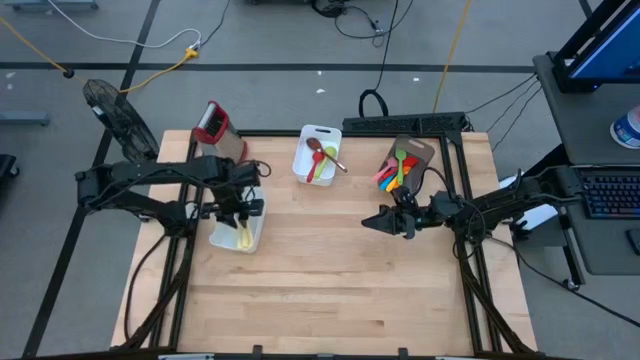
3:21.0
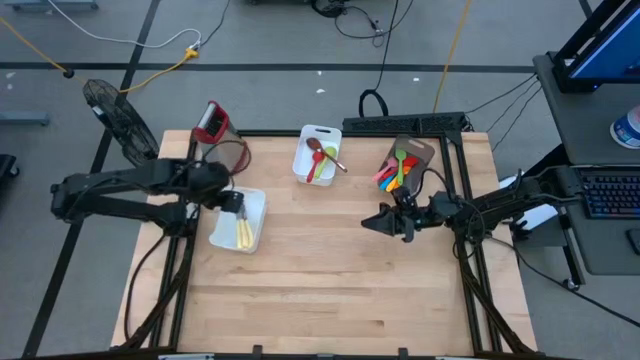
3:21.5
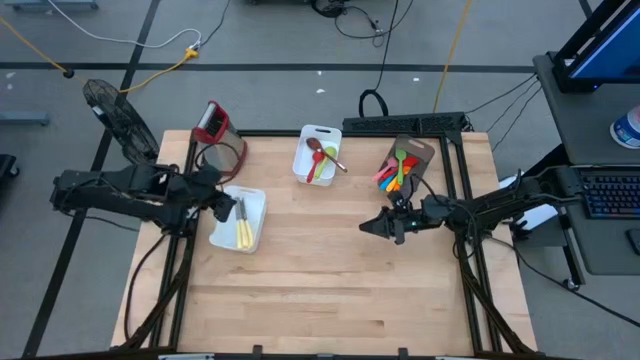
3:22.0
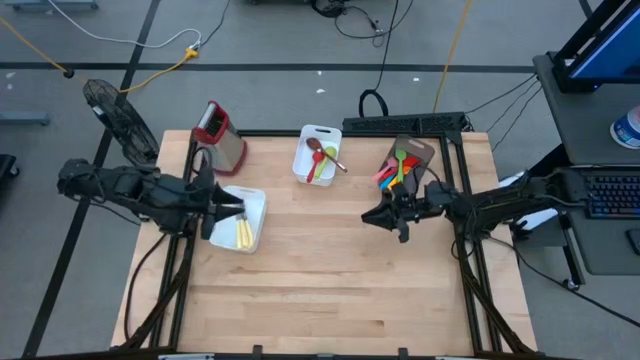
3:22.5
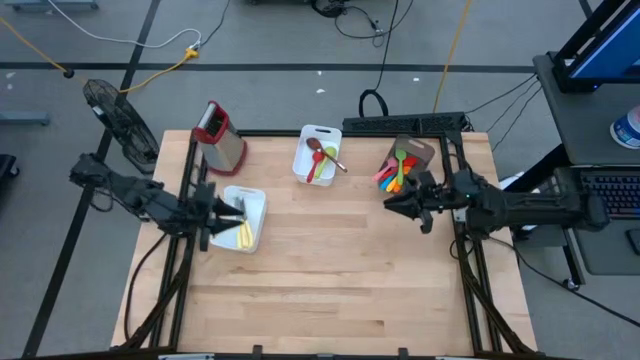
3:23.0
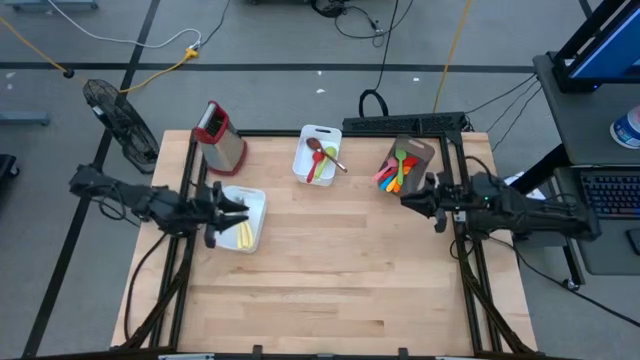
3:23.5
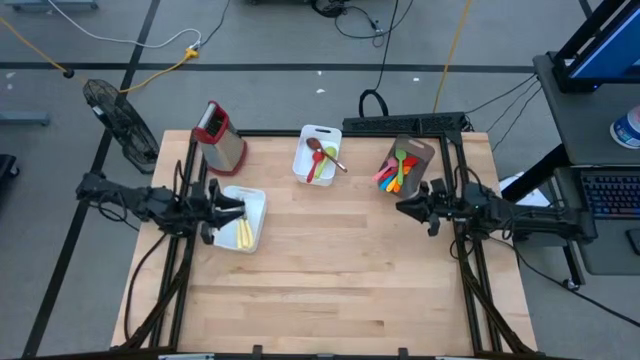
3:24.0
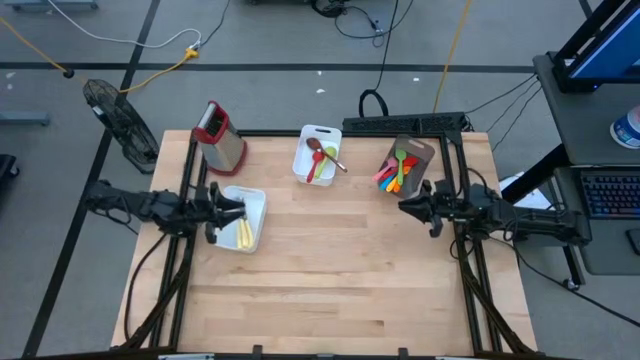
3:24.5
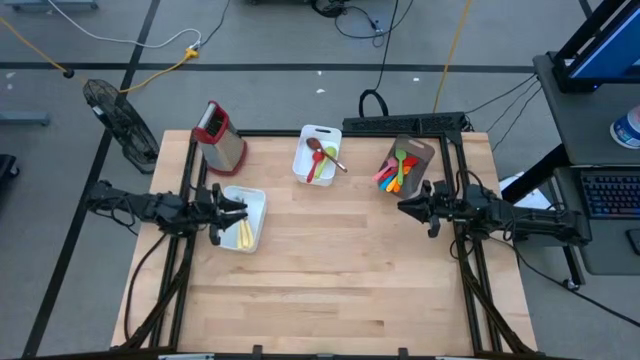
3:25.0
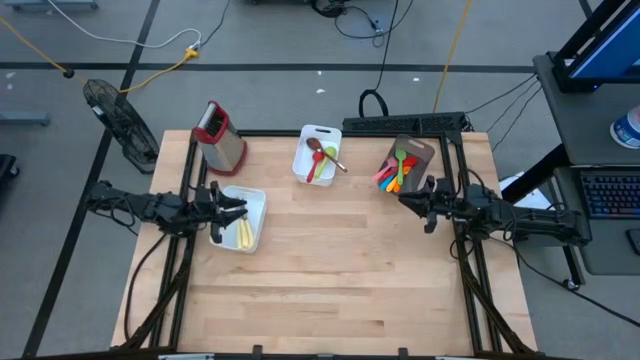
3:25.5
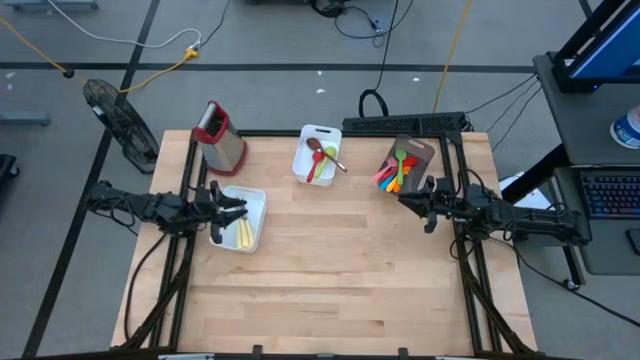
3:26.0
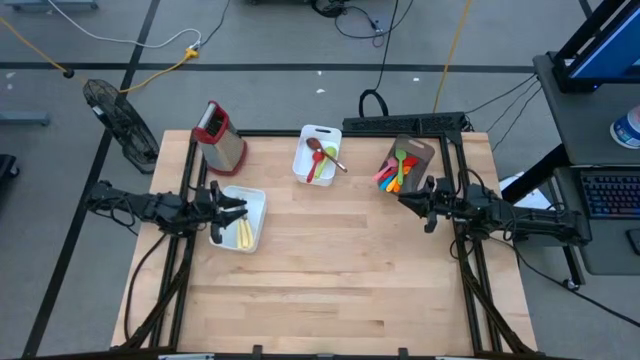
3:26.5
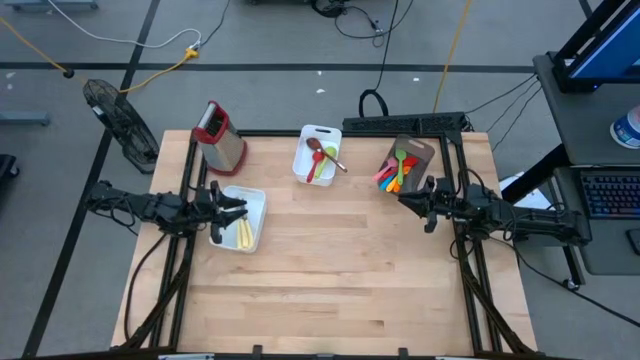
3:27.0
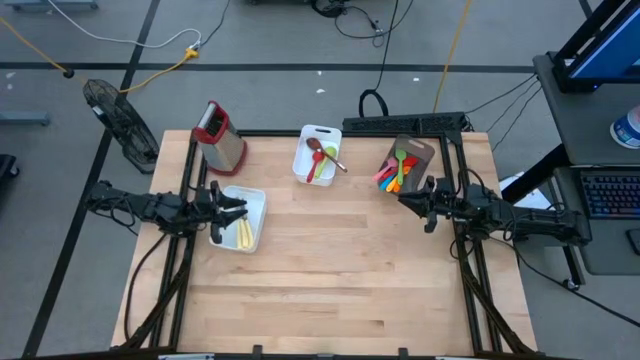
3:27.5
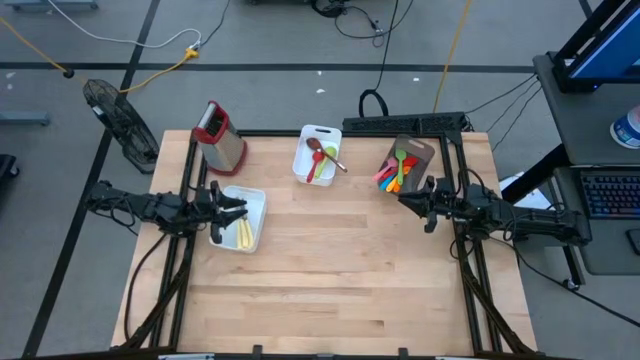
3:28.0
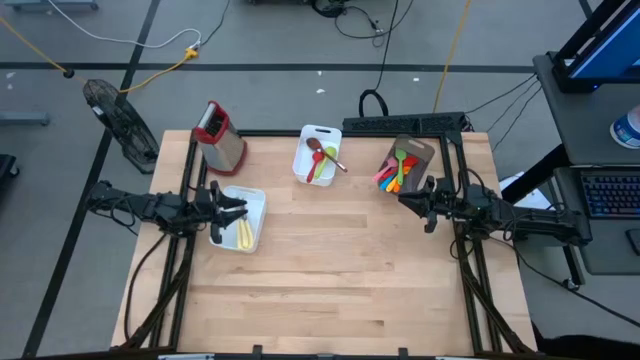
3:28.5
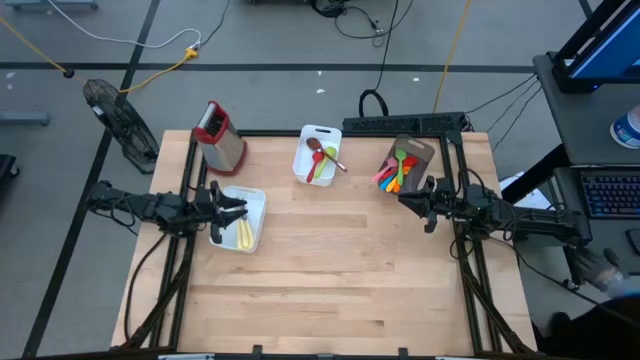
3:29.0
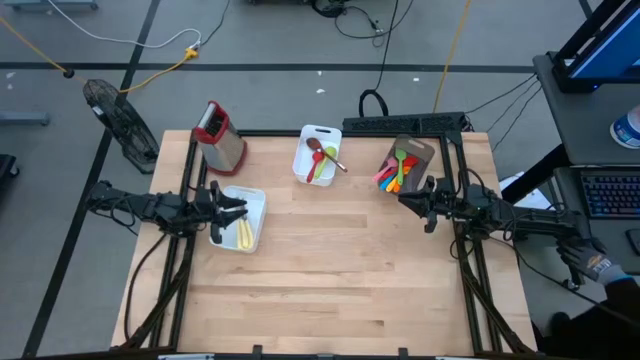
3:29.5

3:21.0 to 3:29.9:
Task: Pick & Place Kitchen Items
Return to Home Position

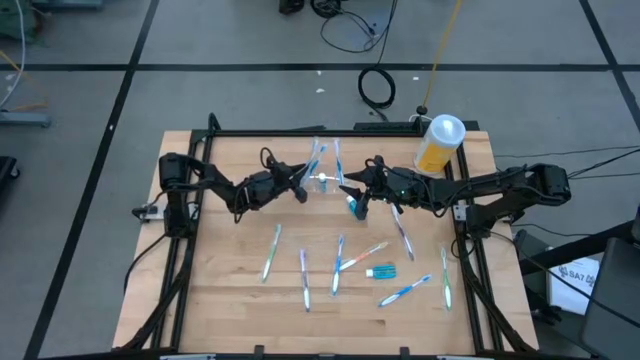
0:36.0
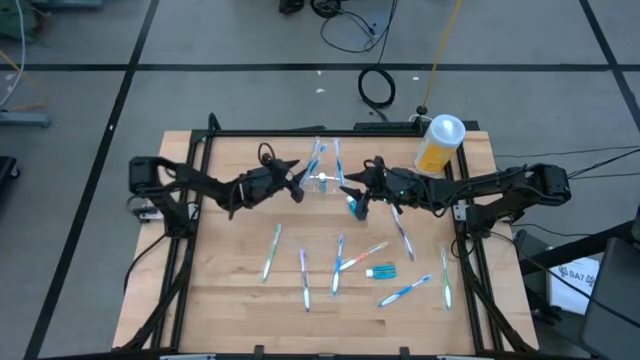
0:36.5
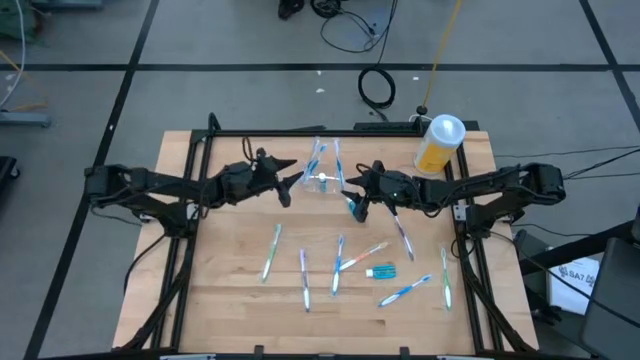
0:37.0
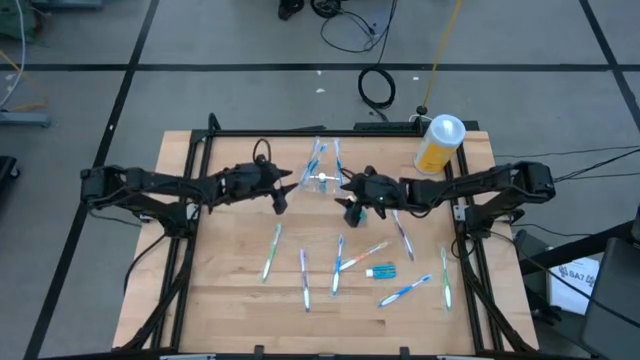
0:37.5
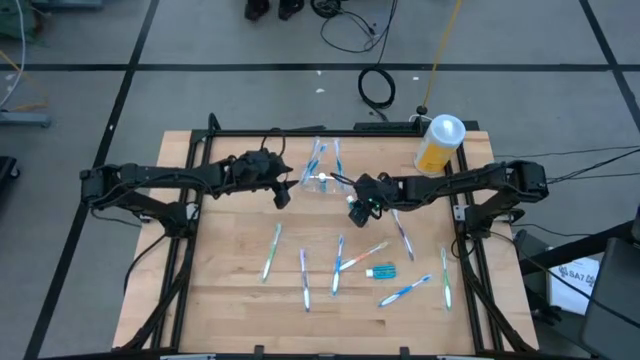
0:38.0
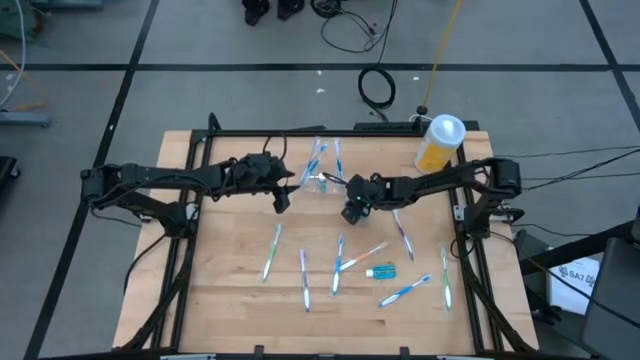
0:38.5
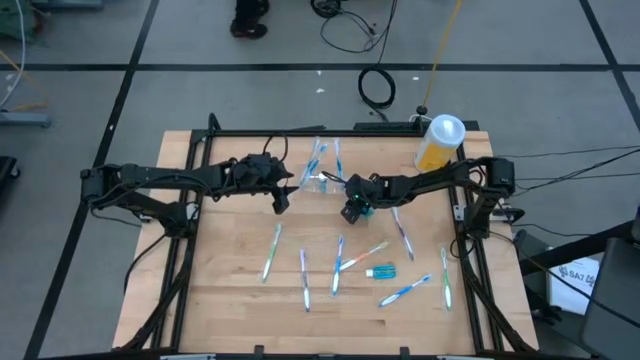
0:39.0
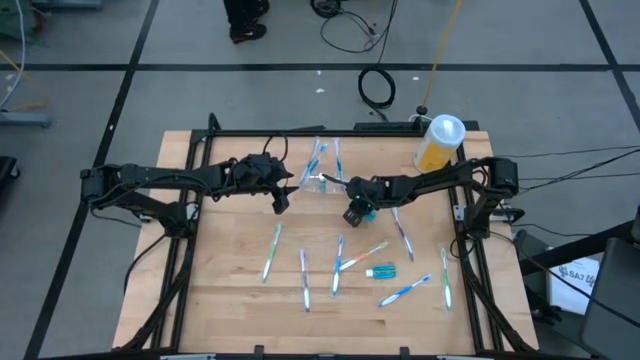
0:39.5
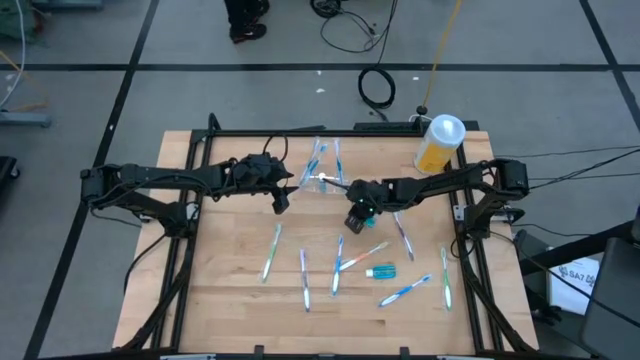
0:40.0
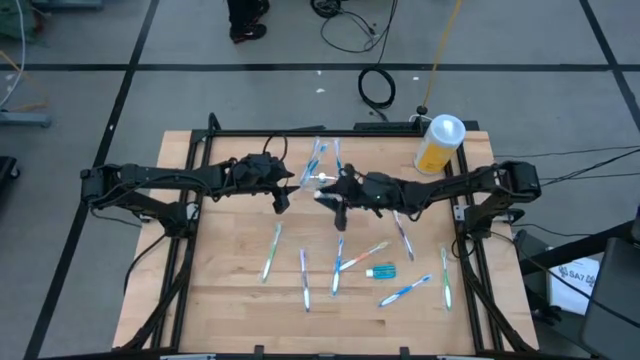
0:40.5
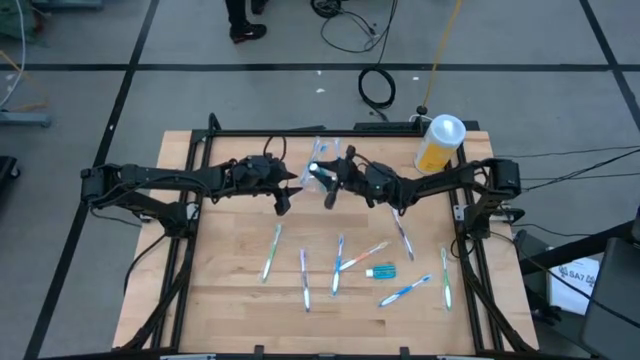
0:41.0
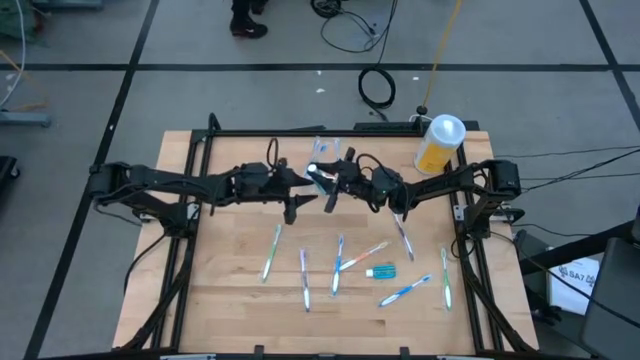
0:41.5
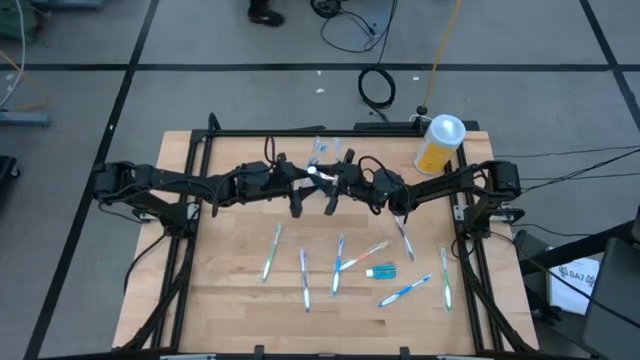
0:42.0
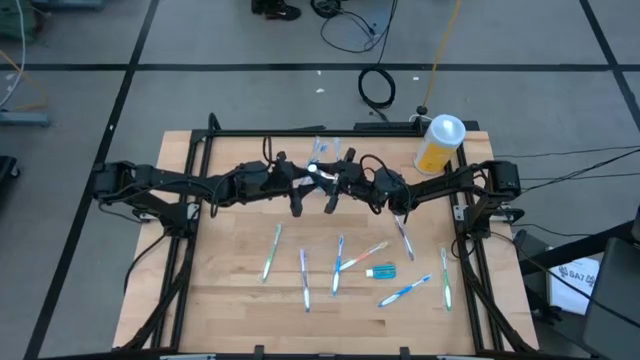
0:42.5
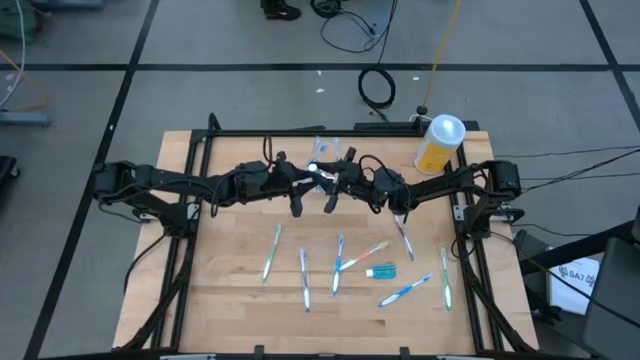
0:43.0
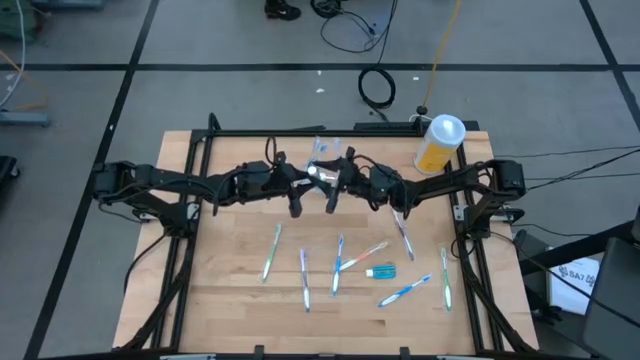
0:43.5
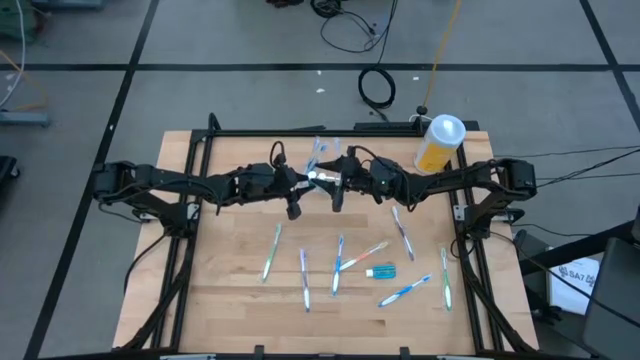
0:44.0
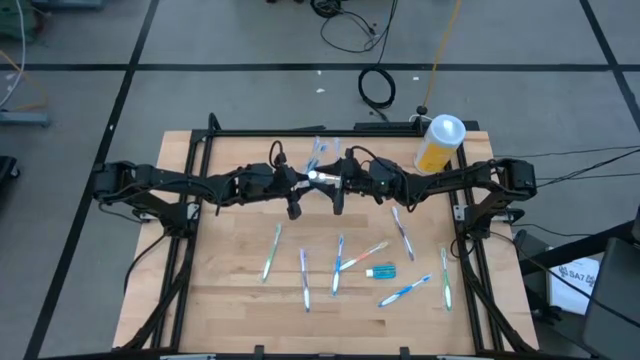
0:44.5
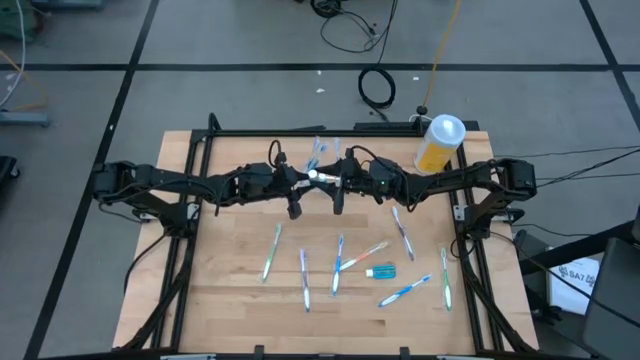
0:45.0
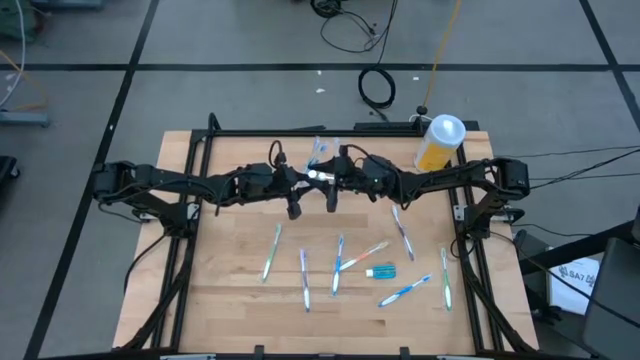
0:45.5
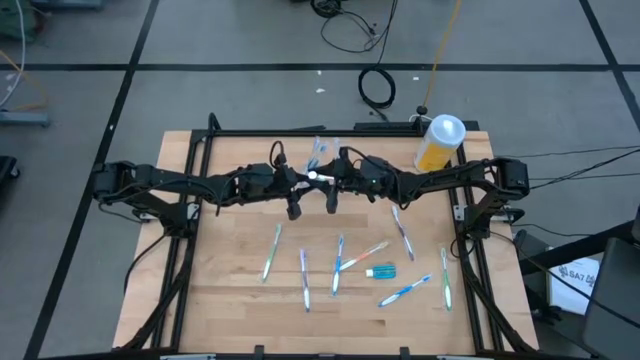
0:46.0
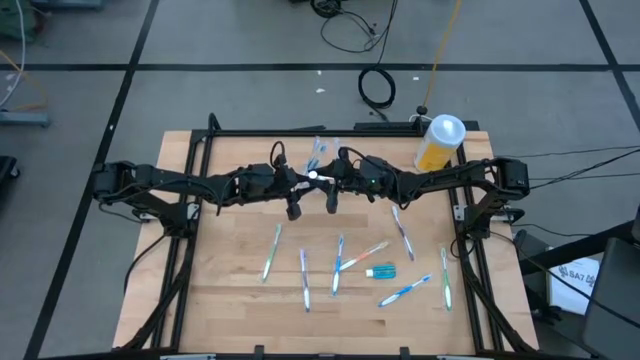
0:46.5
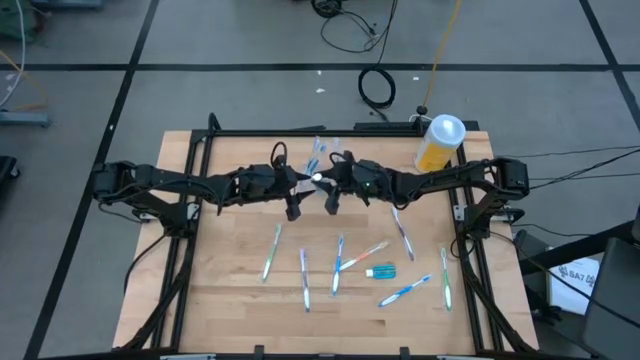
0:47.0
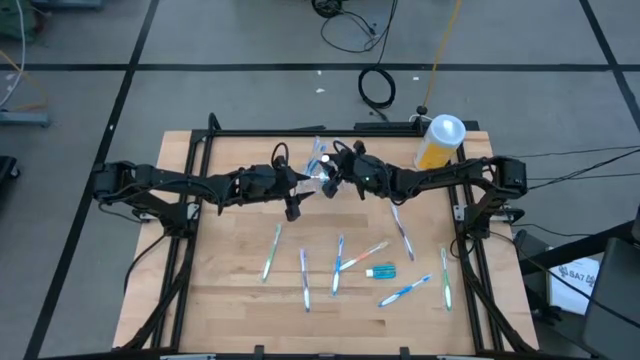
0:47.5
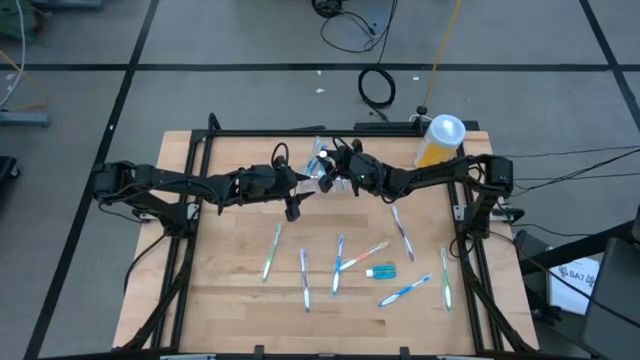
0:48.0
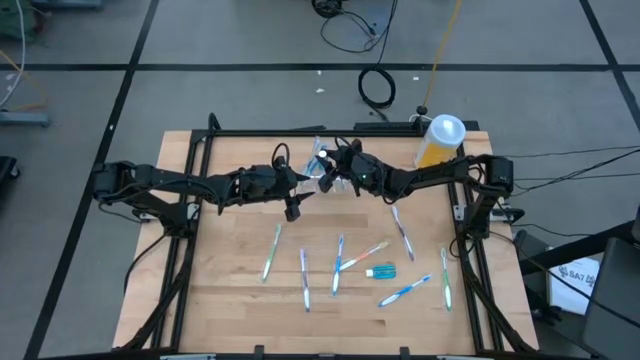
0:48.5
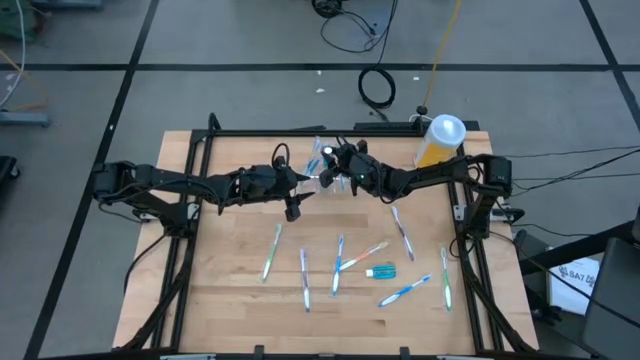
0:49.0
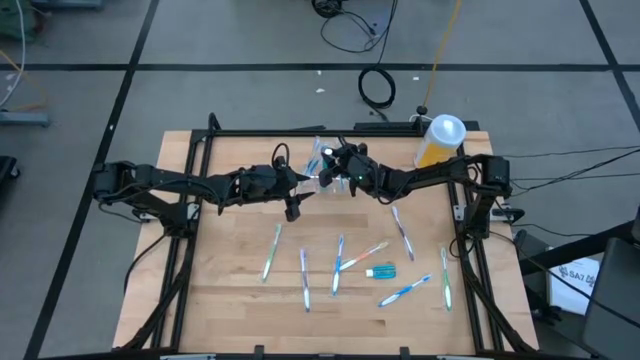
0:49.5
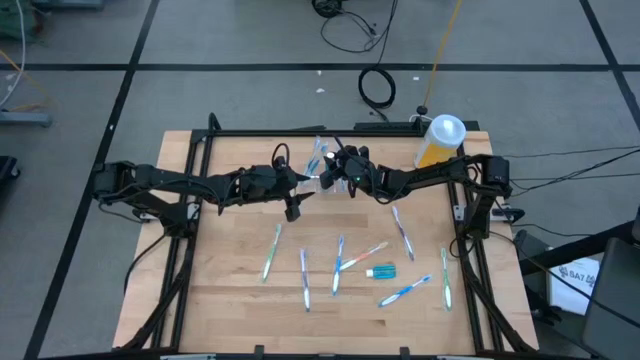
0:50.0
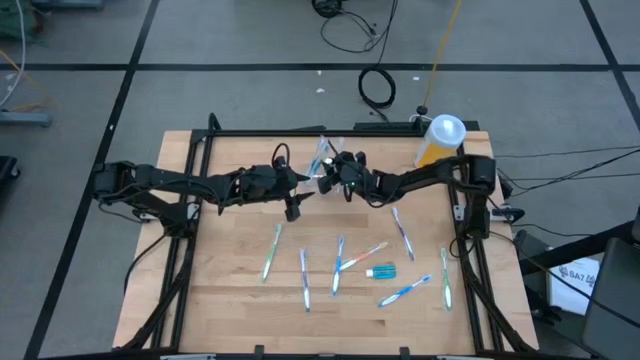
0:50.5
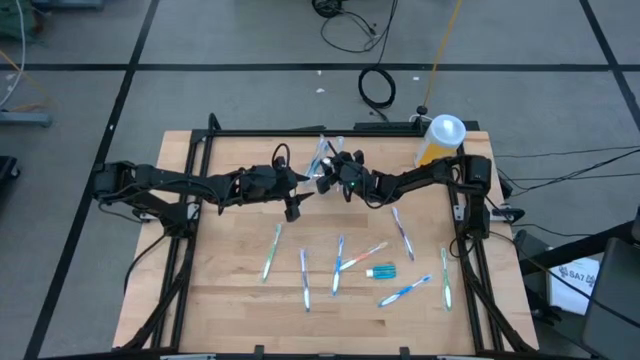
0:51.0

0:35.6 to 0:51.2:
Task: Pick & Place toothbrushing station
Put the mouthwash into the transparent organizer
